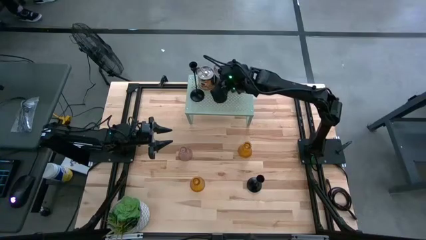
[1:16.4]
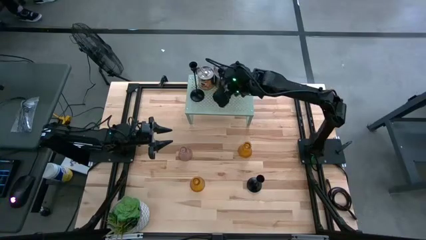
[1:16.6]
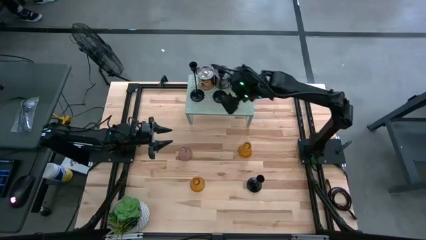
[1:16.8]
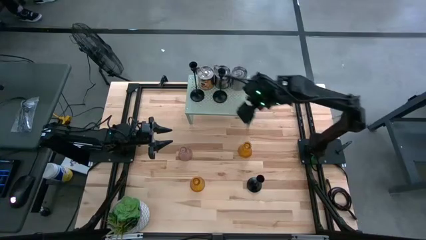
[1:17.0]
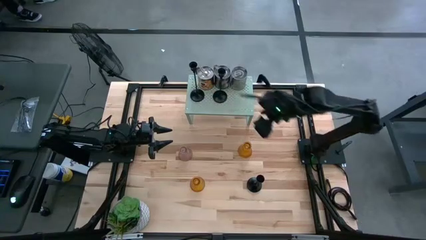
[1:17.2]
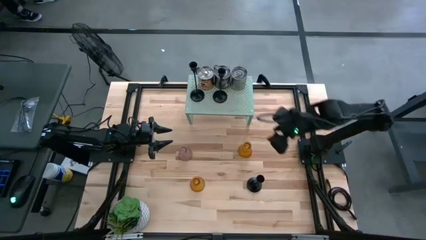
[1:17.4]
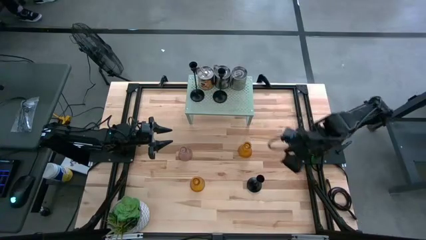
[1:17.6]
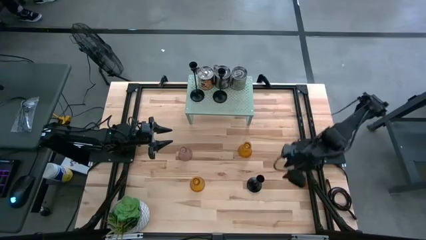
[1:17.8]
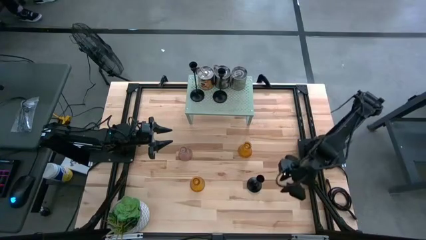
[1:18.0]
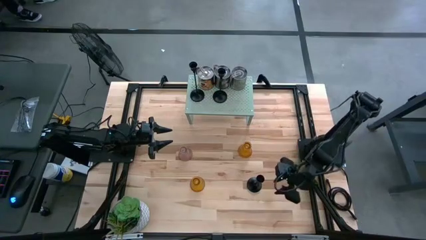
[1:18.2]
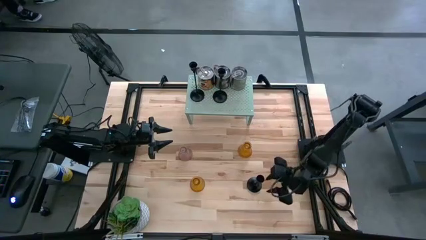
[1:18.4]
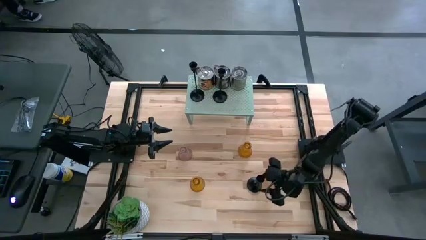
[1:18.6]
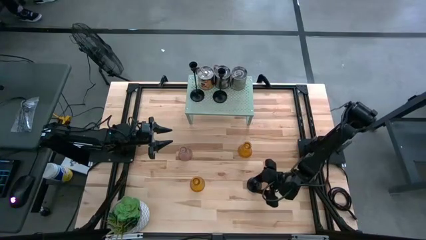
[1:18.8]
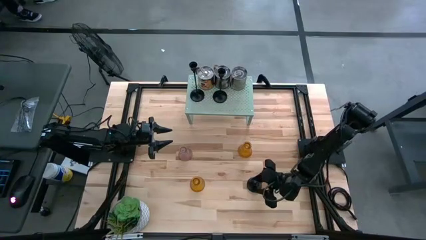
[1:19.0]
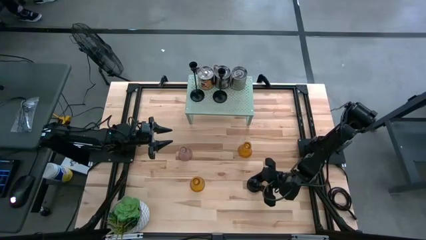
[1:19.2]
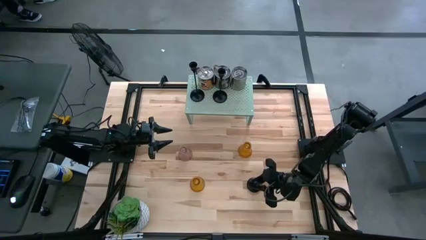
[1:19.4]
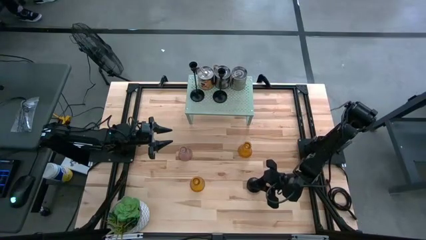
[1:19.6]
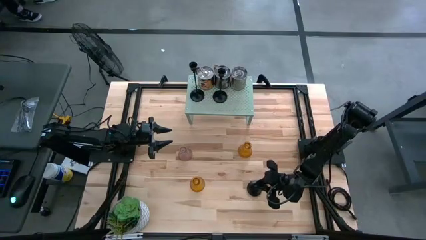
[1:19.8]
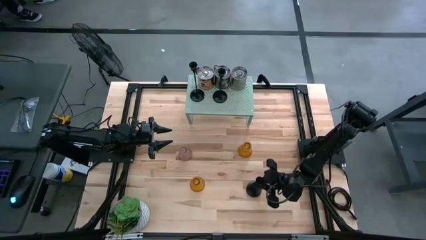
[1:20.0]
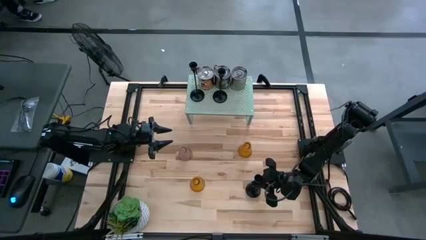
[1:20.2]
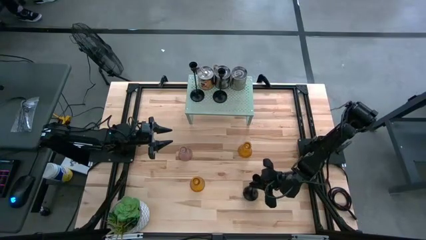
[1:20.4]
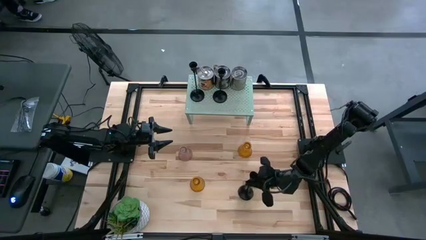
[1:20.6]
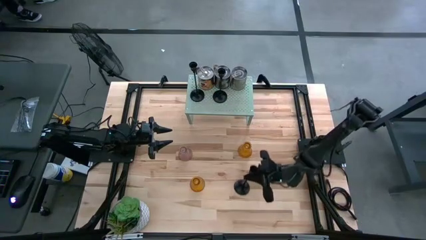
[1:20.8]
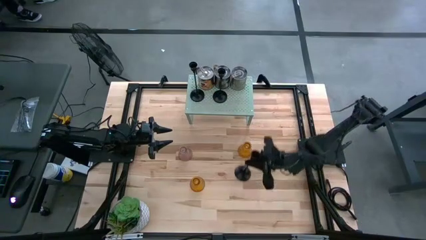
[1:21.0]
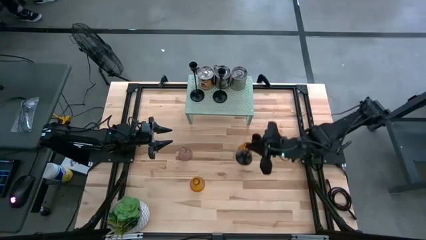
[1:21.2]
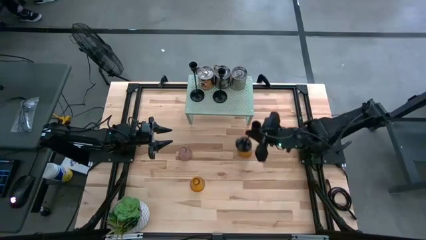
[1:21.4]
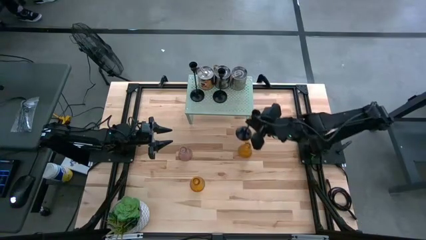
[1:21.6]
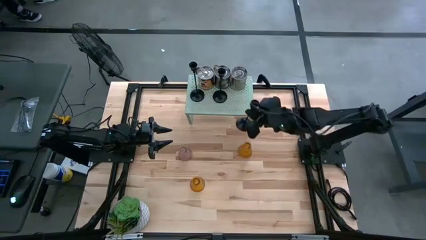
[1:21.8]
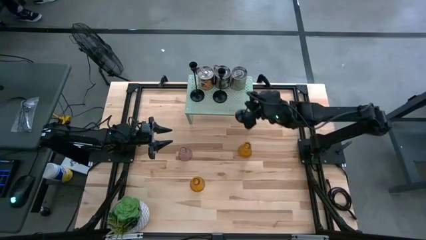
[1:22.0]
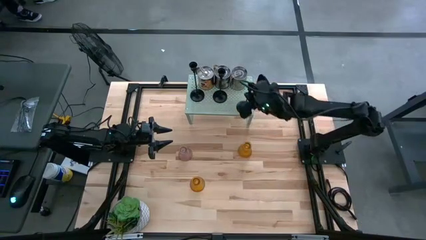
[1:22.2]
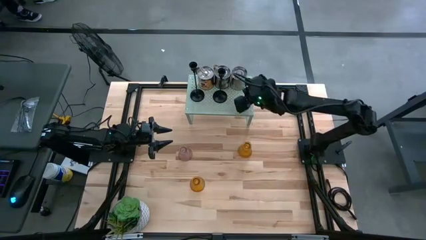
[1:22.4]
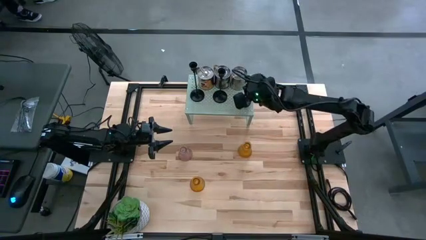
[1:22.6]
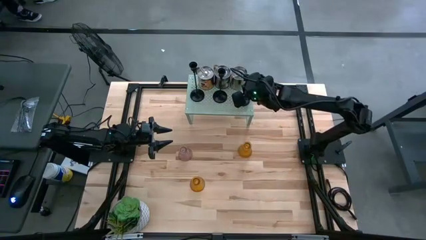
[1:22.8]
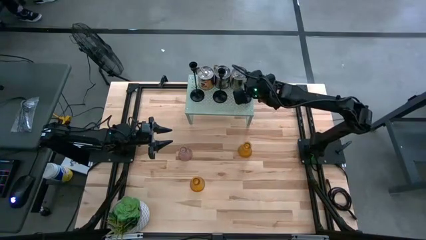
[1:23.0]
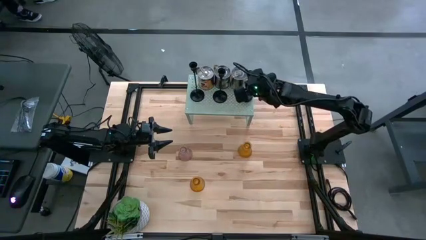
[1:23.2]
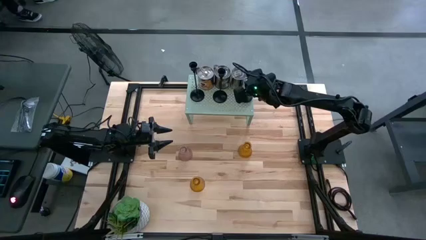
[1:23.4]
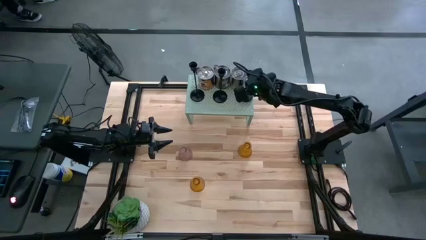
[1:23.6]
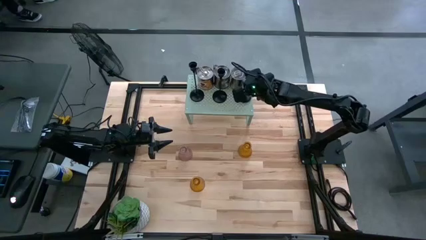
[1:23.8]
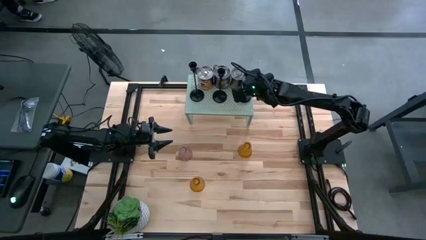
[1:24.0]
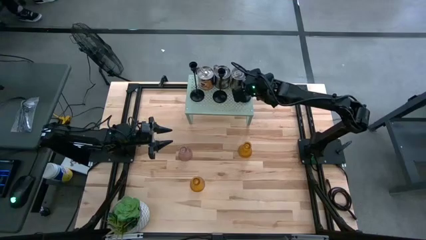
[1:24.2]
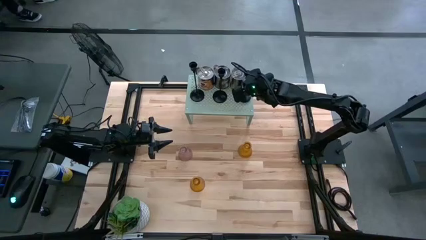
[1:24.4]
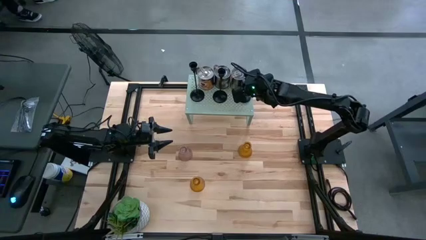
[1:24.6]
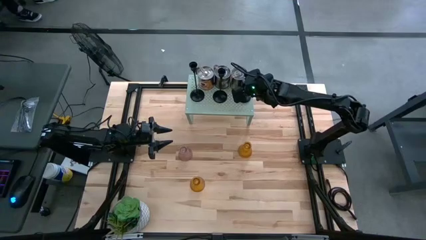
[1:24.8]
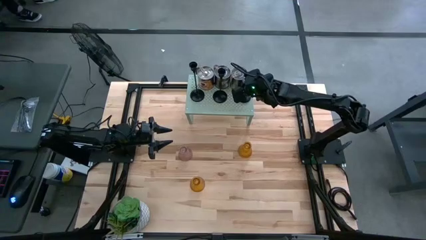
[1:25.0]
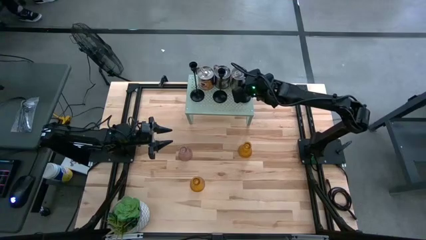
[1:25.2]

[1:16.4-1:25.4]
Task: Pick & Place candle stick holders
Put the black candle holder on the shelf

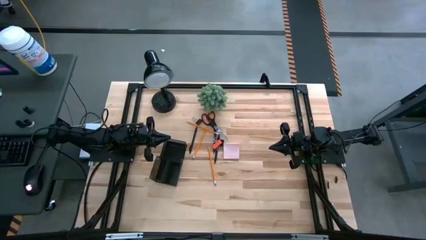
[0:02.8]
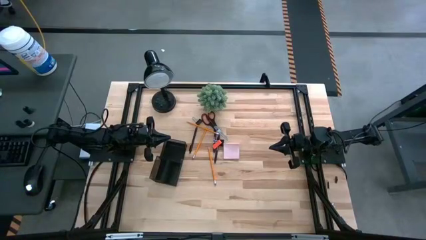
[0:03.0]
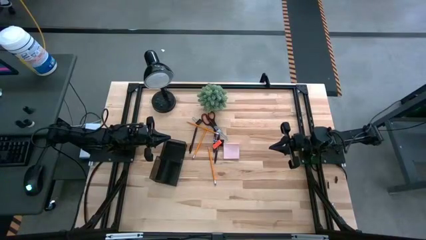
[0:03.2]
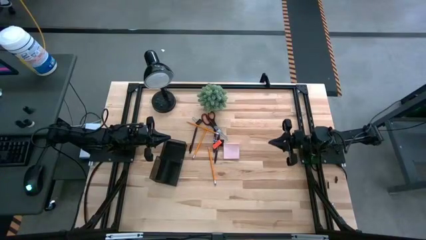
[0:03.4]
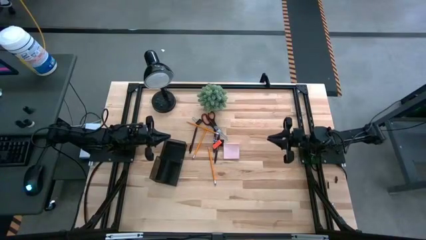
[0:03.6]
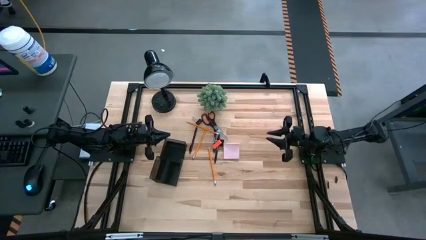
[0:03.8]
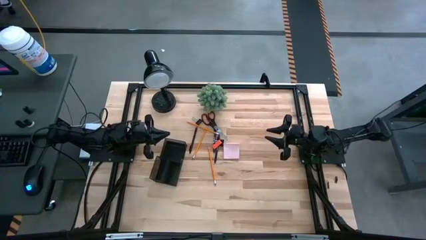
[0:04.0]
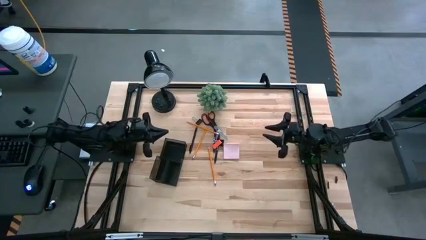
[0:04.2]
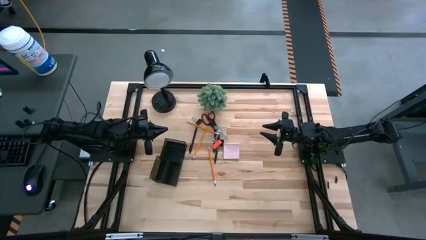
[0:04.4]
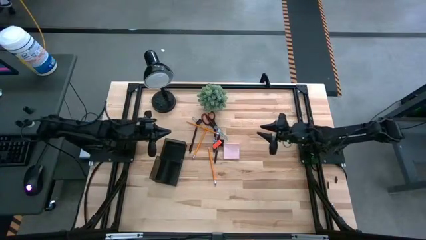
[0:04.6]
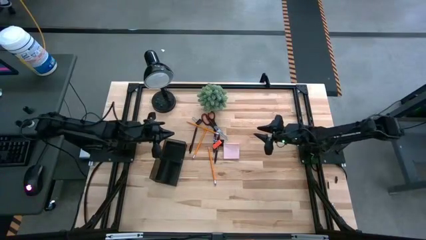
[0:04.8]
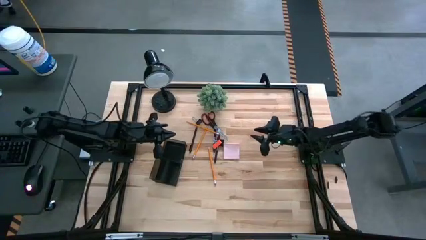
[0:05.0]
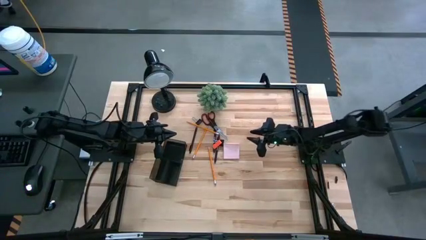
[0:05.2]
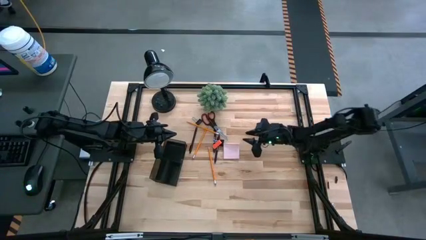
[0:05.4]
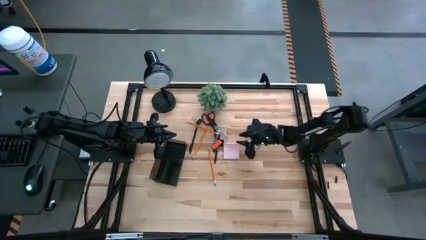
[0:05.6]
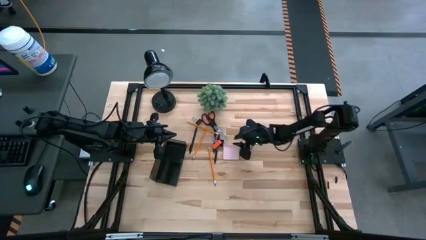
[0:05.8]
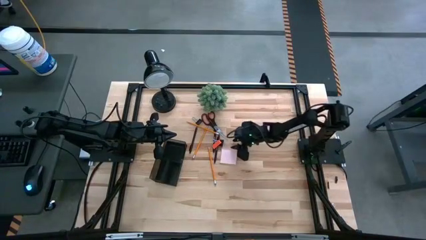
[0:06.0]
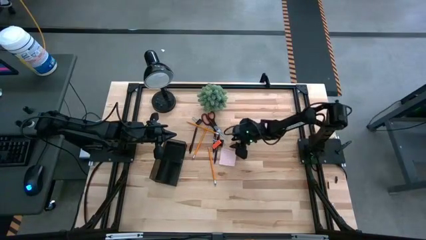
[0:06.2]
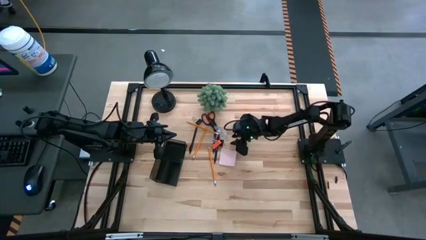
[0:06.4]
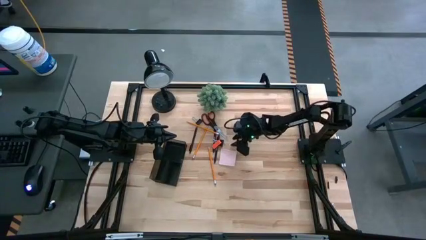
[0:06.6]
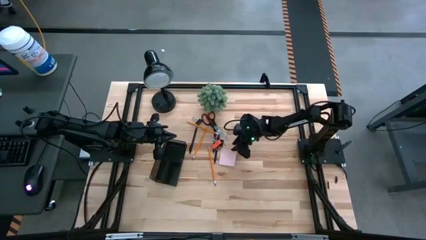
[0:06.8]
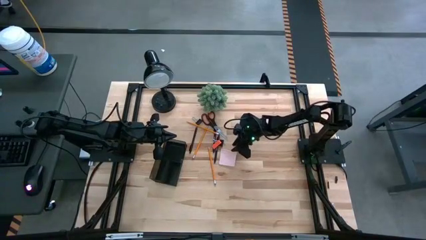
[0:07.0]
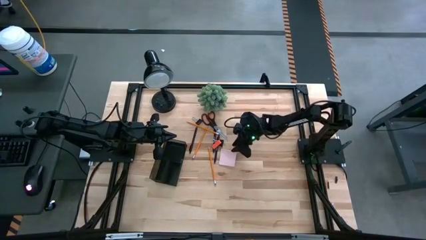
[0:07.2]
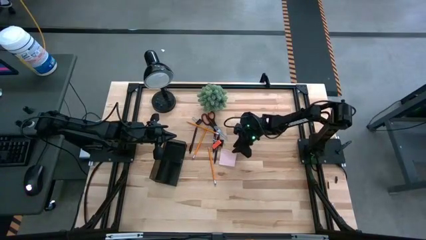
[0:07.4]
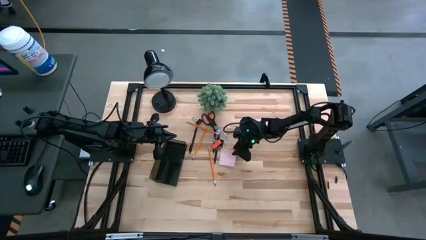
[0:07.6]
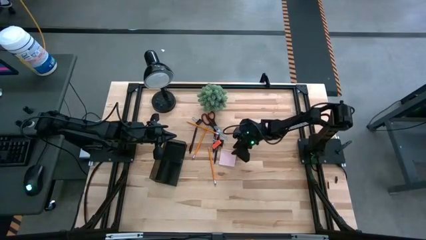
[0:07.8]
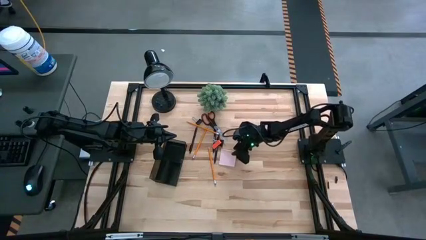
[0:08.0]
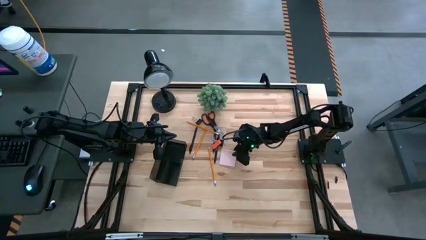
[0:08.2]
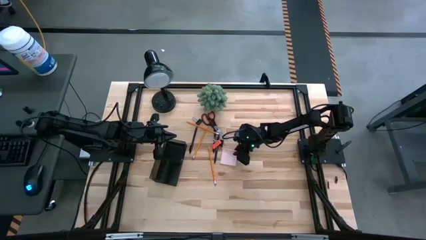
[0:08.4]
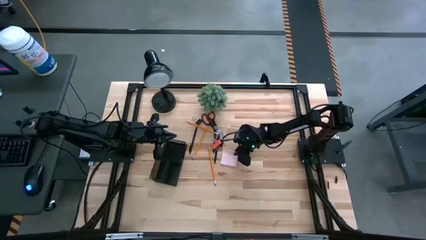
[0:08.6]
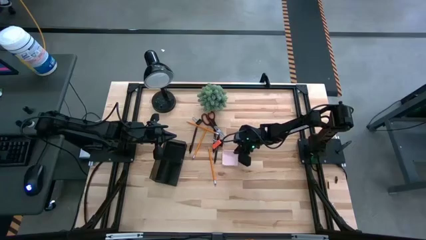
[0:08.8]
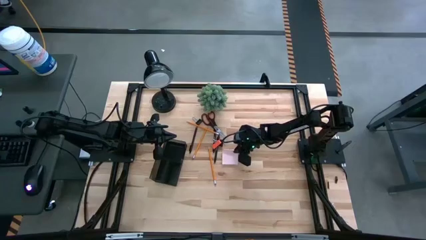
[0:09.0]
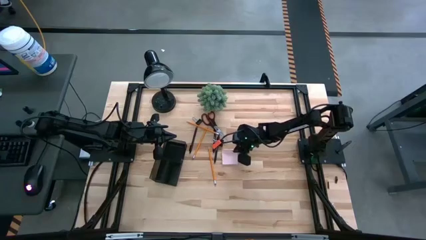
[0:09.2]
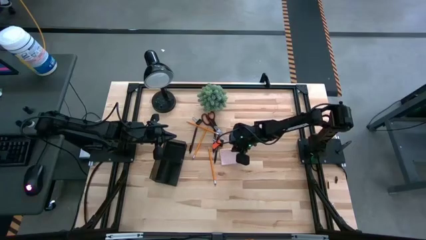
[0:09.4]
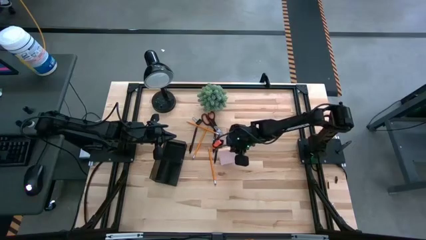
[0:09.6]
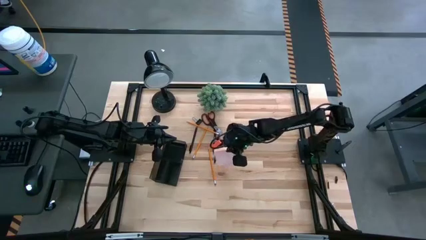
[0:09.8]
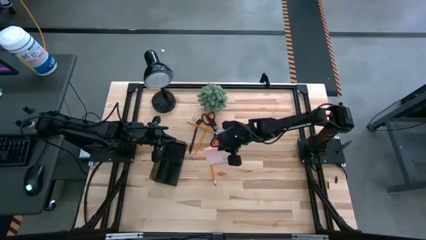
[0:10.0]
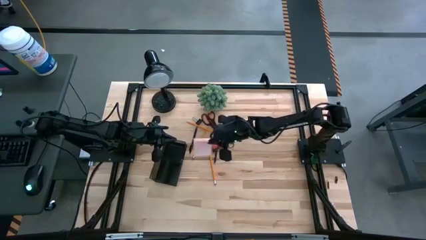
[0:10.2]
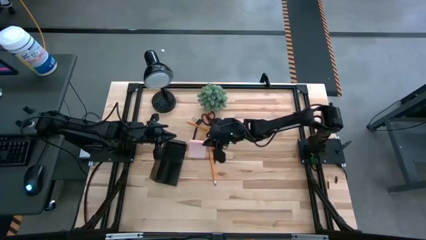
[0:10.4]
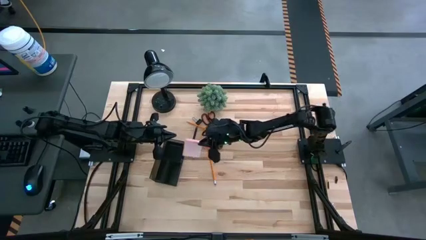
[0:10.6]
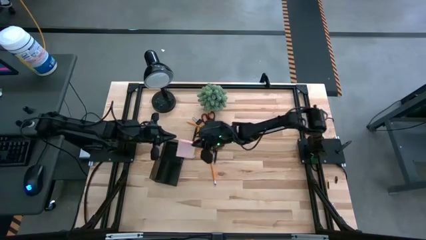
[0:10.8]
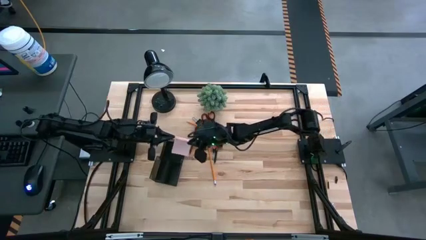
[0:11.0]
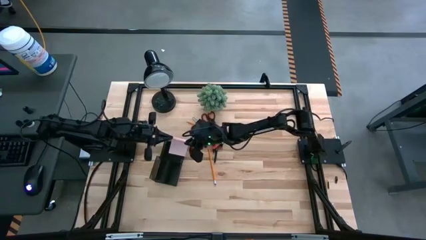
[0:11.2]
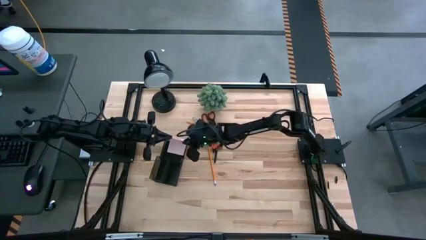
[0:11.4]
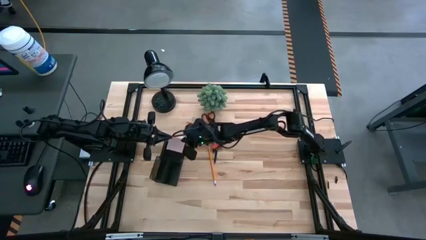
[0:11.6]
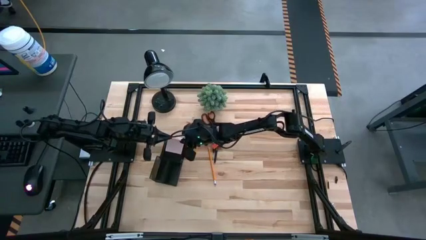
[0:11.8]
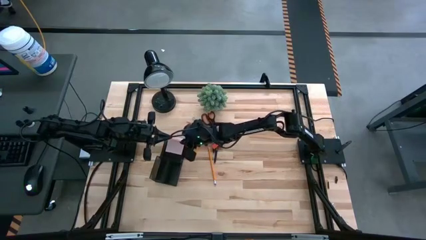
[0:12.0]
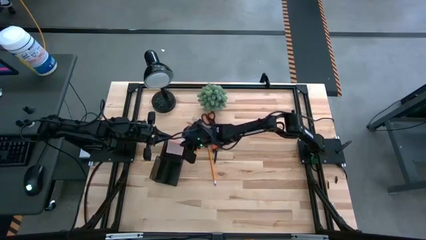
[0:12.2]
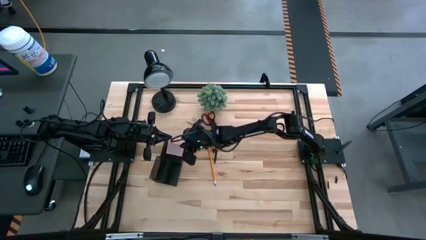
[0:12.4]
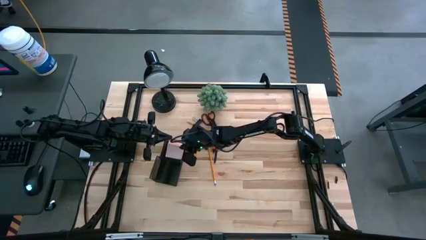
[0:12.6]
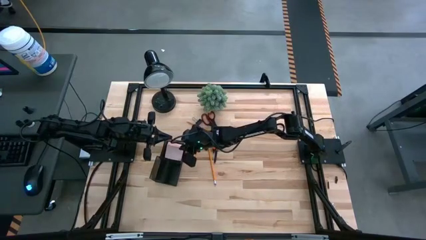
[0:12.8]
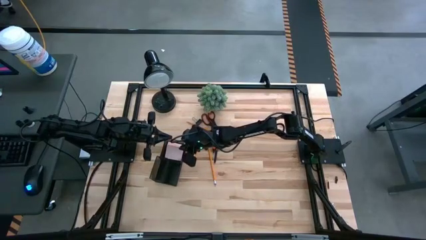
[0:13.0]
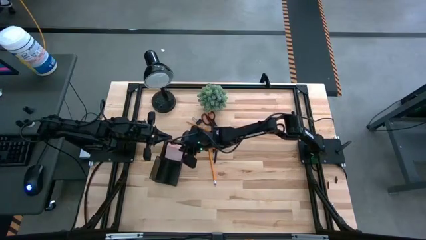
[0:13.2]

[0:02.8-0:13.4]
Task: Pick and place office supplies into organizer
Put the pink sticky notes into the desk organizer
